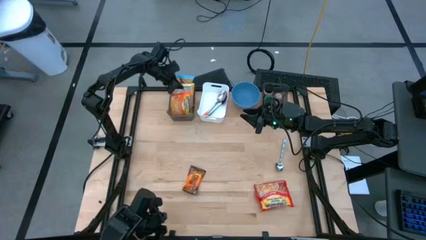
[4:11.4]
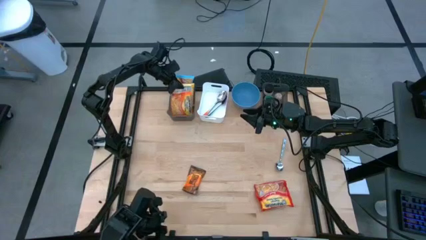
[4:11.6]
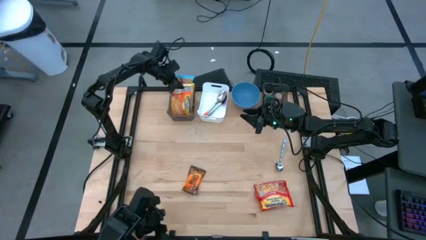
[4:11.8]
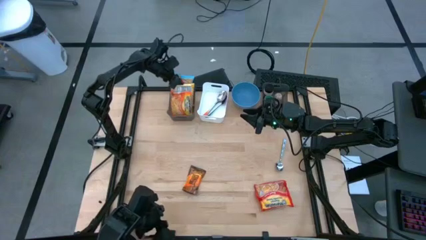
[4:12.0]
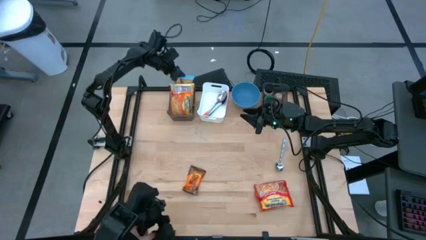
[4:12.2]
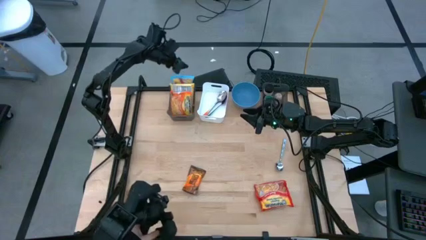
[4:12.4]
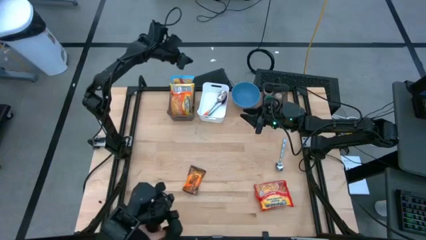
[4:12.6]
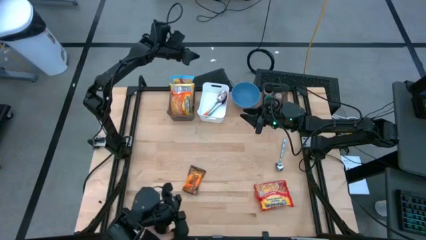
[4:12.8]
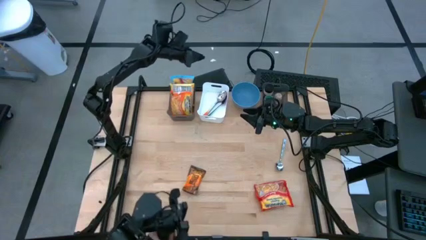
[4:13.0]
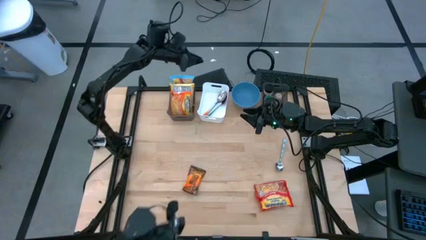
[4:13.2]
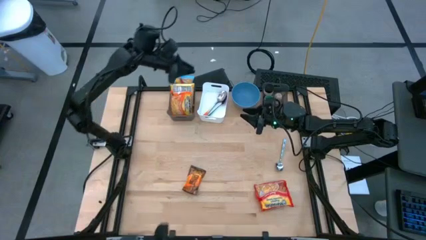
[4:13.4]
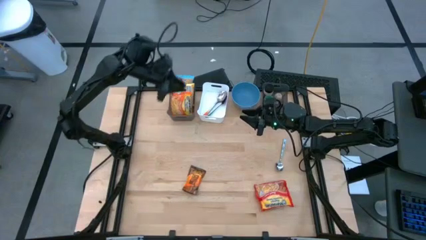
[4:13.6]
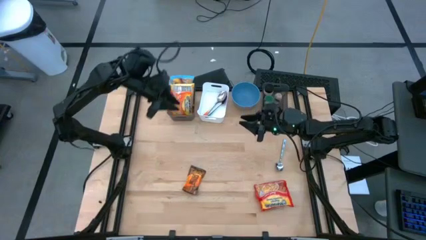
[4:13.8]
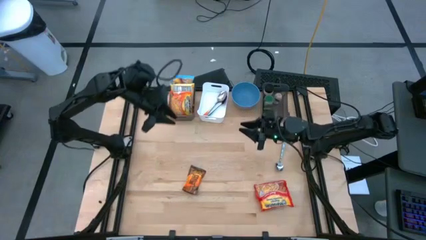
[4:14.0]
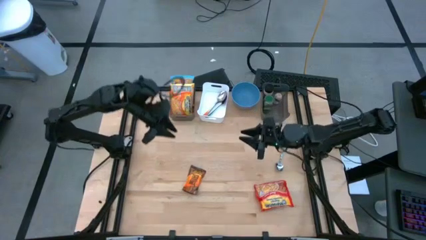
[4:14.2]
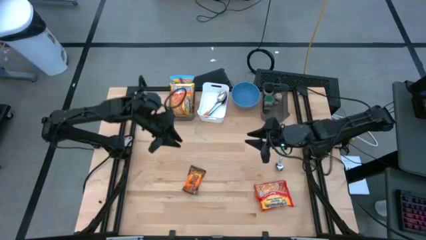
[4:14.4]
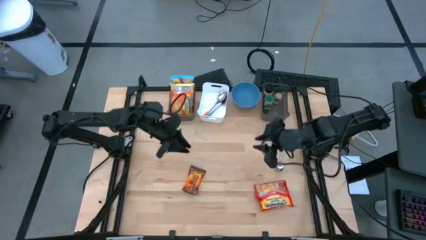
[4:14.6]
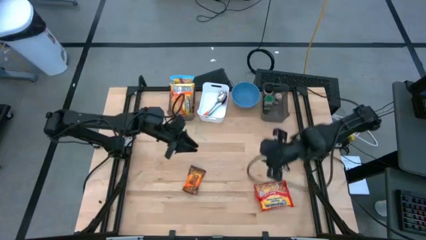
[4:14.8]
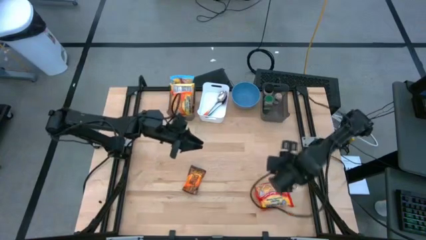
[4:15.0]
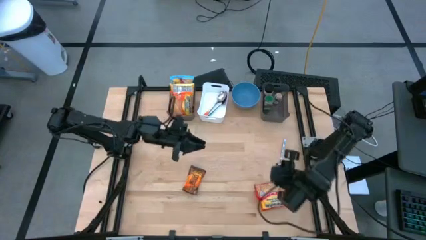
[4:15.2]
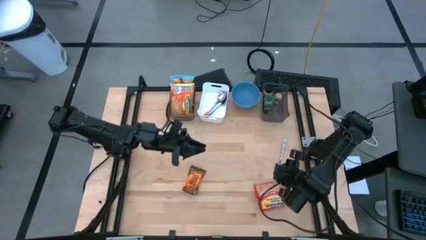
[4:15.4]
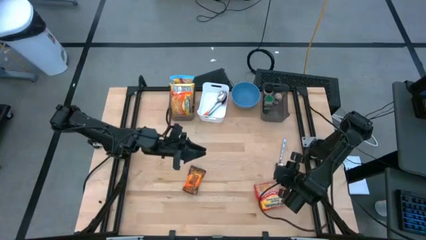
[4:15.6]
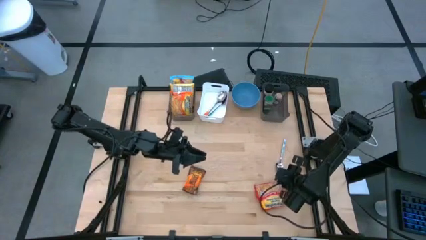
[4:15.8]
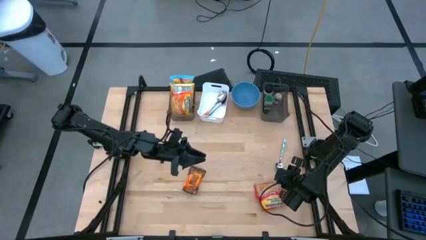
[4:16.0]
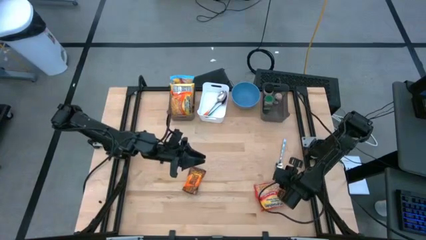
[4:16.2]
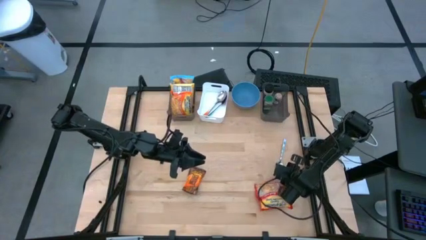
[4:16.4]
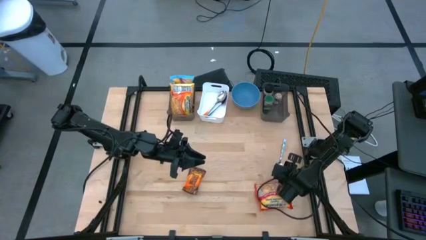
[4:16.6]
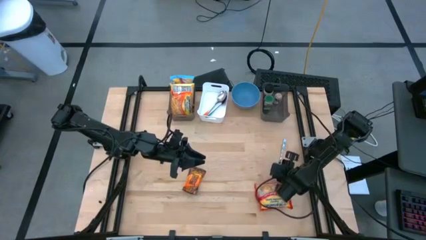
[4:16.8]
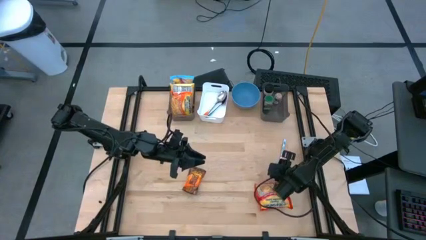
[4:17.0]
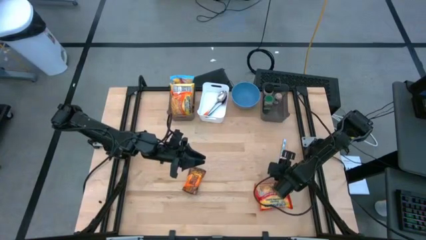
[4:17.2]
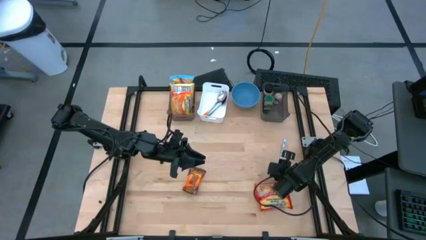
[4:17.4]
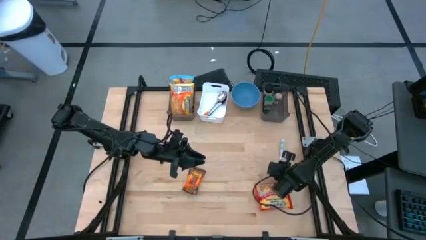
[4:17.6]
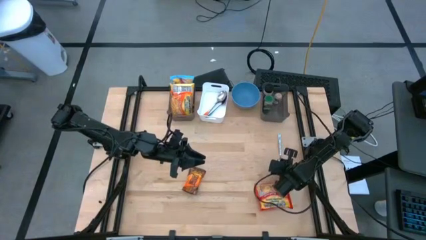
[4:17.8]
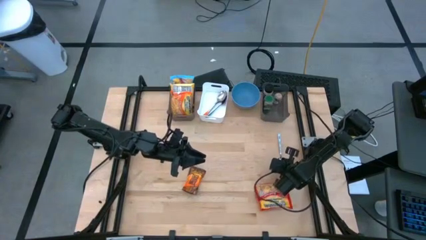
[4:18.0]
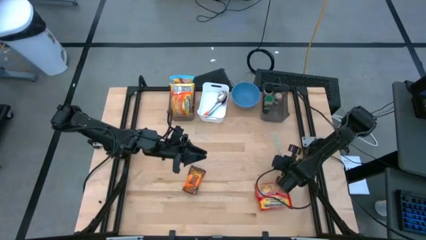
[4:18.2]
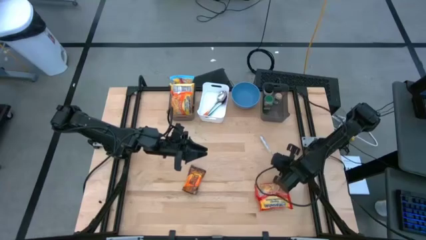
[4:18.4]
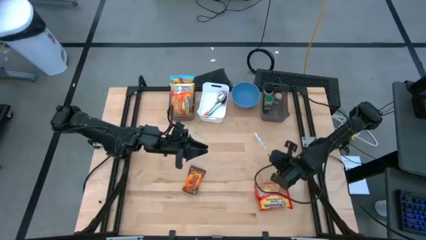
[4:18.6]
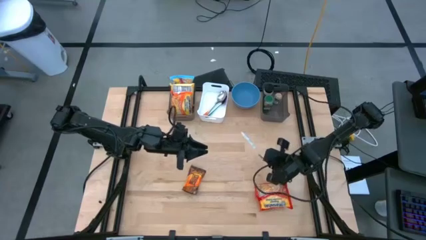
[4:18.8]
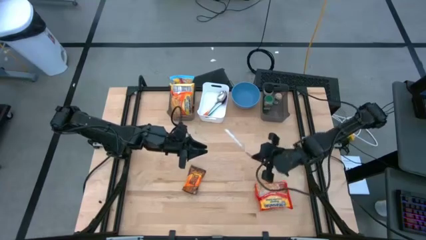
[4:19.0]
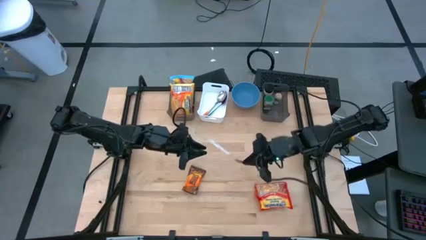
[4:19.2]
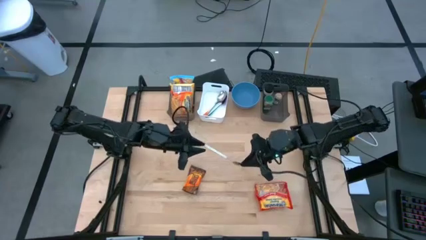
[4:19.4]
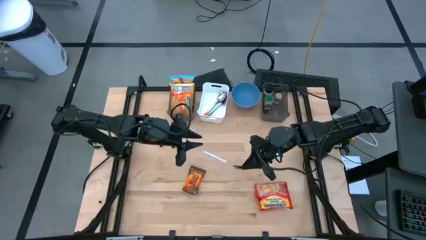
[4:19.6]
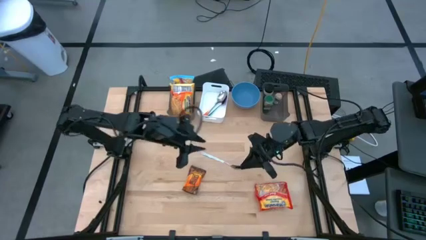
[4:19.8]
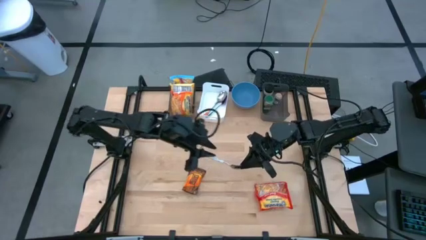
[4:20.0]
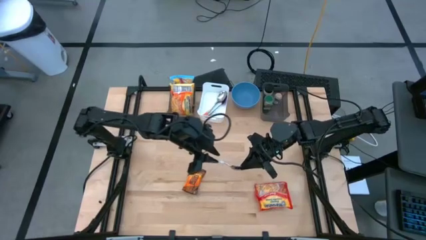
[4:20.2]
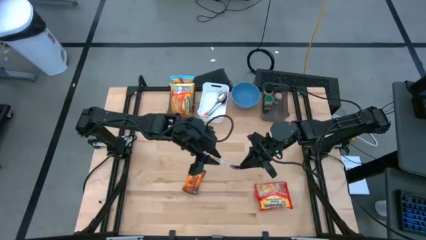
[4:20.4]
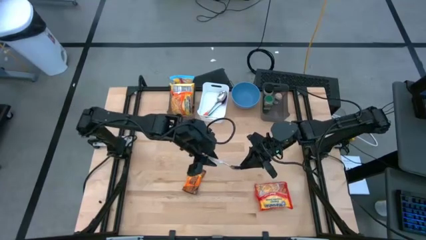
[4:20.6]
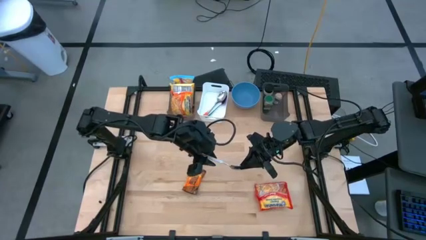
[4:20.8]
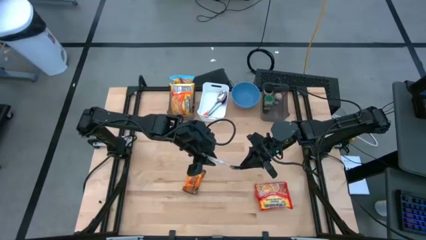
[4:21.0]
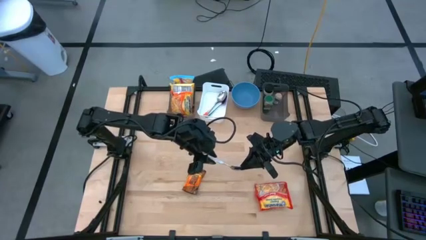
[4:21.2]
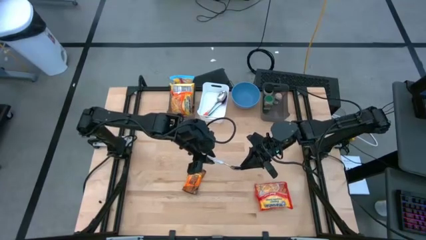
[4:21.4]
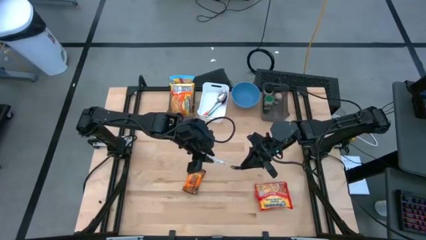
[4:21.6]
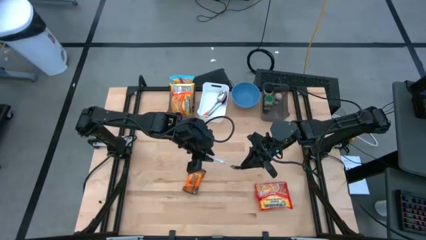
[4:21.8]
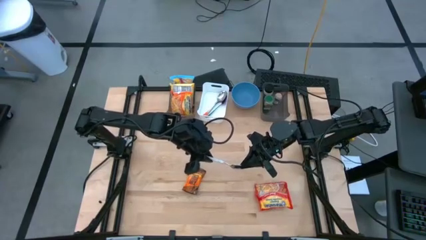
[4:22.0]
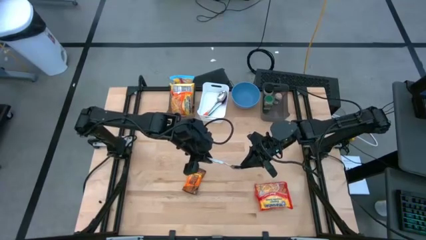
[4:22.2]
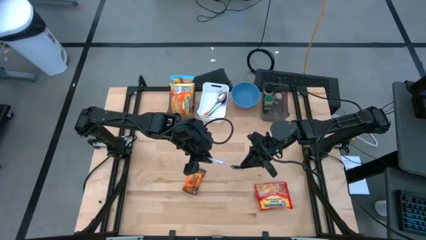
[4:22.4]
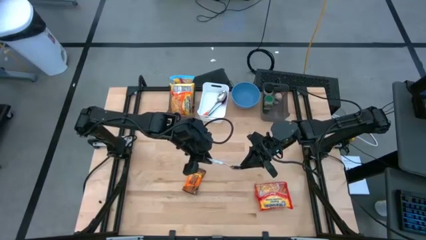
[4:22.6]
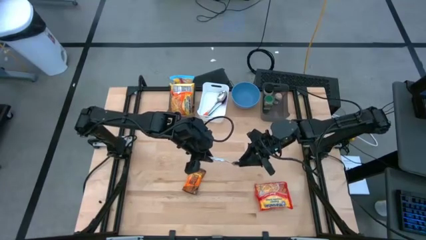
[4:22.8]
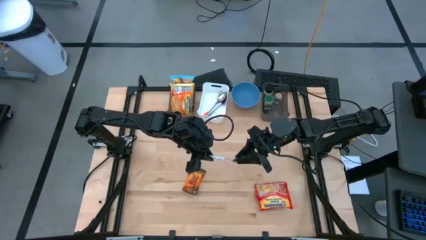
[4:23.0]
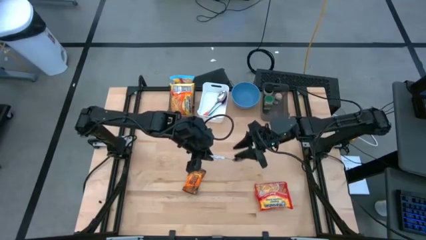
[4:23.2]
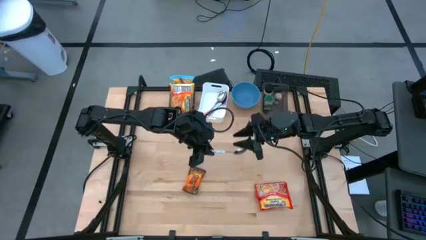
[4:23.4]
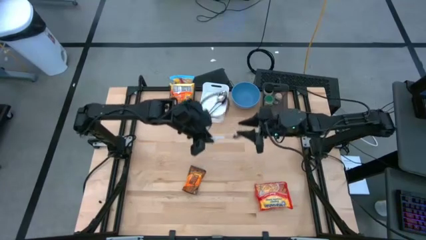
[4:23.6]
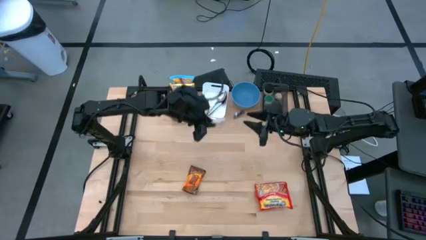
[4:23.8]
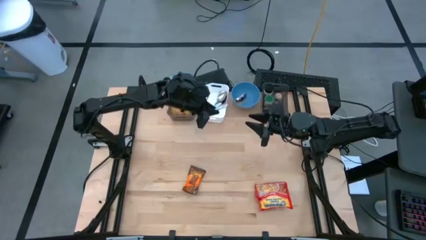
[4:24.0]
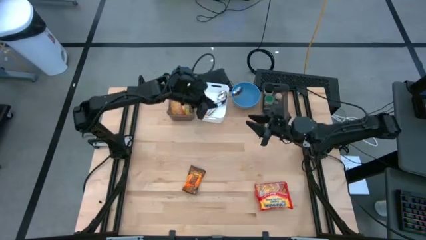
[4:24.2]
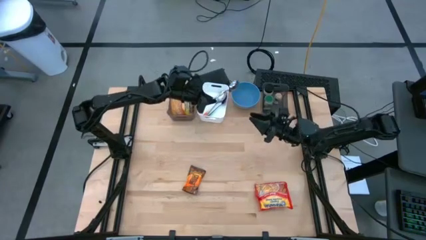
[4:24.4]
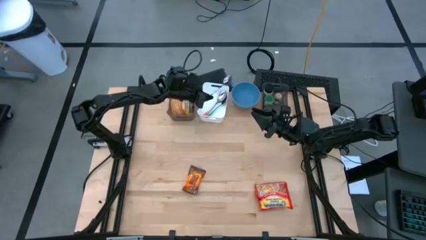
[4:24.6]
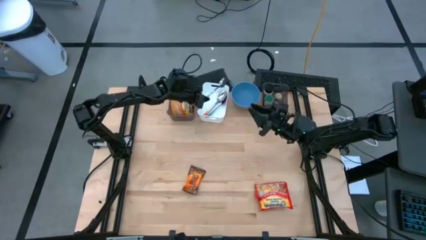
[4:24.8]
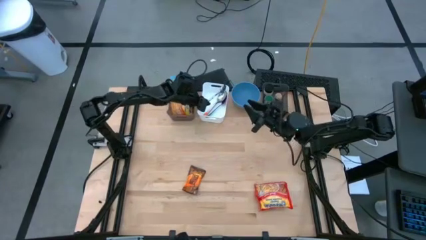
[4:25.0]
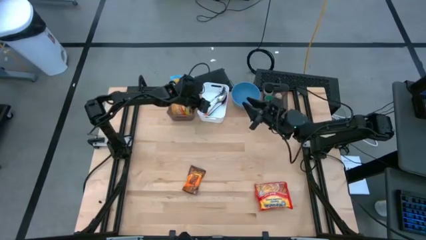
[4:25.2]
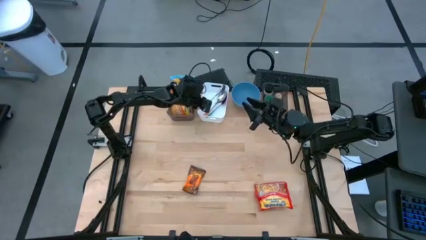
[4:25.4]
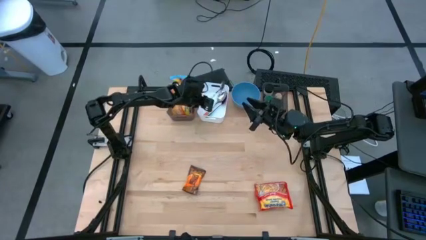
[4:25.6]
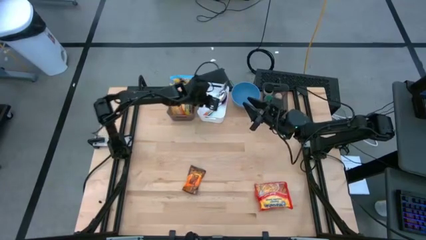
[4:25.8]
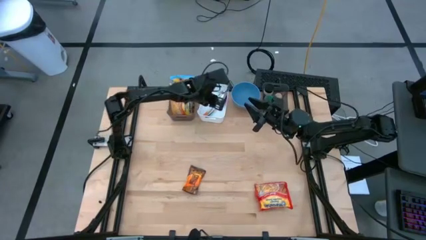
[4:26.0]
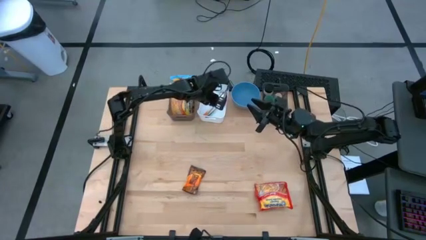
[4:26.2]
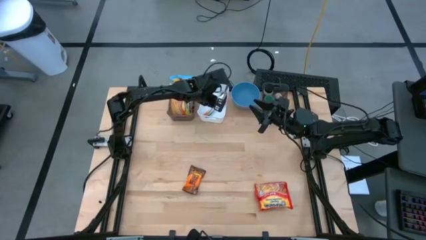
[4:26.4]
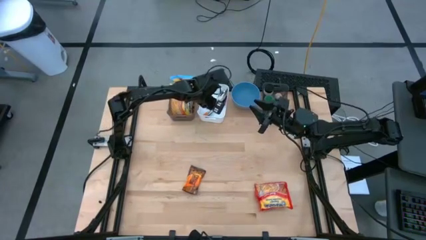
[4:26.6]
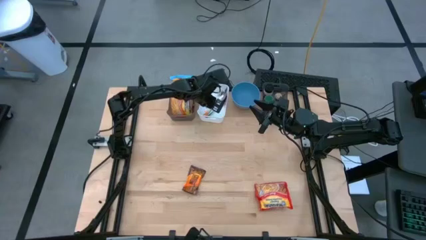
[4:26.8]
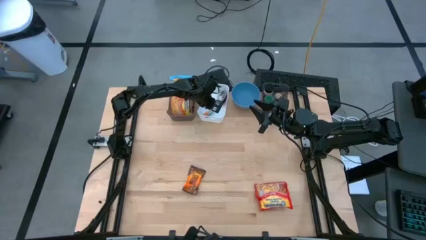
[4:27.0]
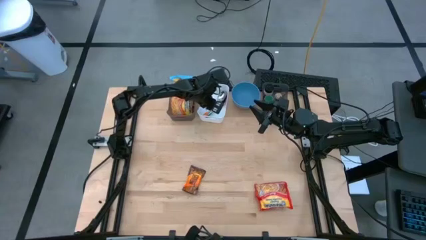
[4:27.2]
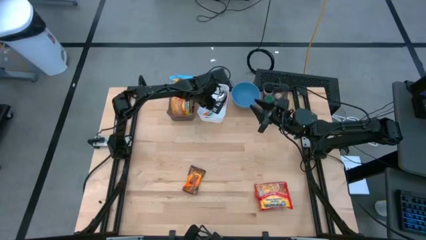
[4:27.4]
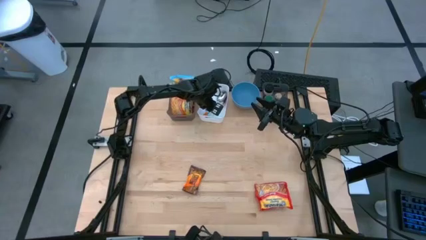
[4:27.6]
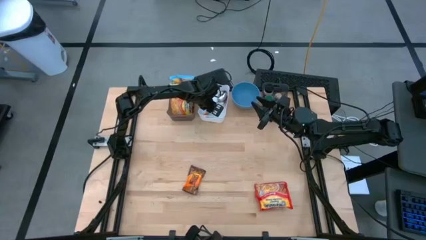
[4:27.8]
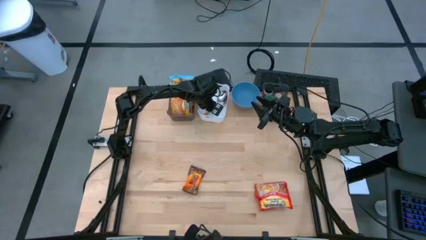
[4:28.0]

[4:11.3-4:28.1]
Task: Pick & Place Food Item
Put the white and blue spoon into the white bin

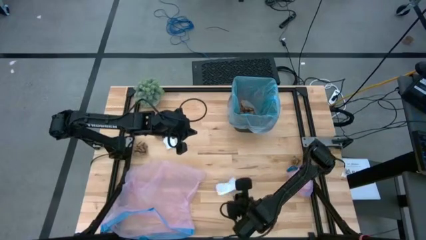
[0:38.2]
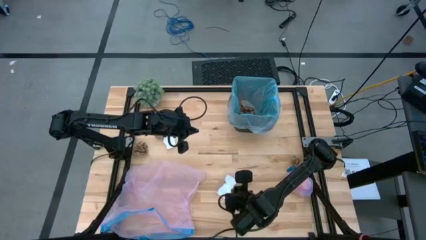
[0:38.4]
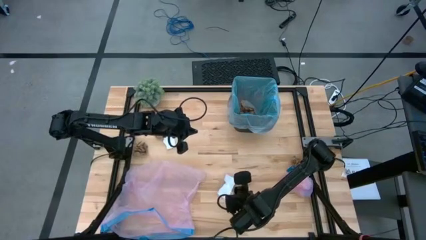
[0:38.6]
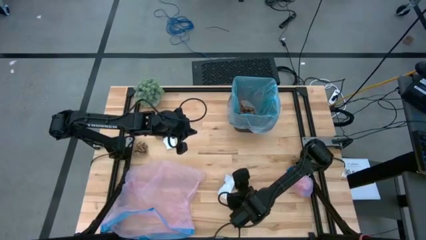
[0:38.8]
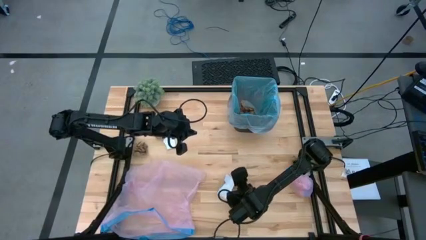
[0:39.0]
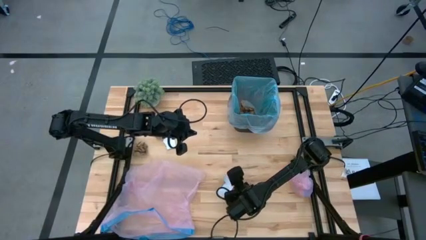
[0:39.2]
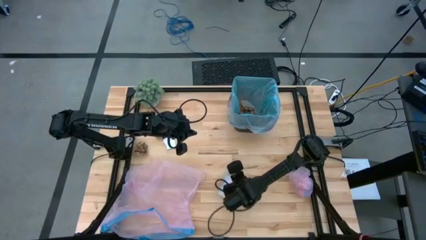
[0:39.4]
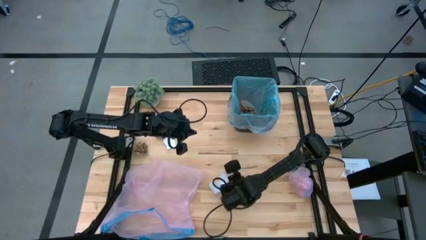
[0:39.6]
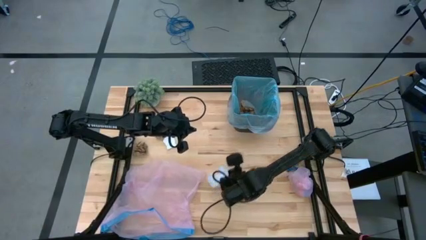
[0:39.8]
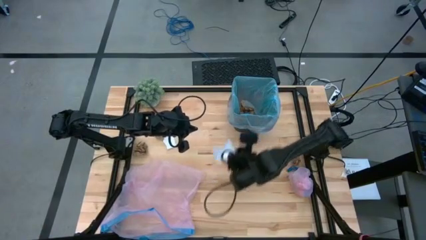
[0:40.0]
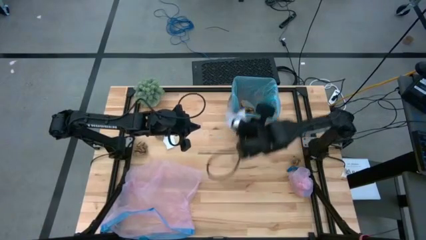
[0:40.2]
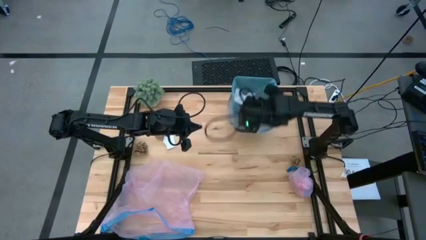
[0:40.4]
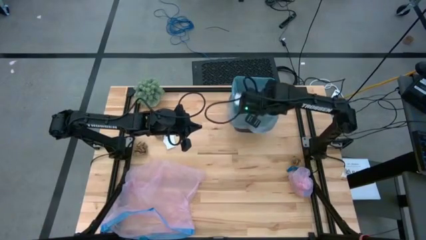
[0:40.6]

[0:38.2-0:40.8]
Task: place trash/remove bag and relplace
Put the white paper into the trash bin
